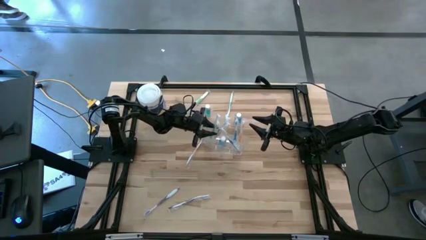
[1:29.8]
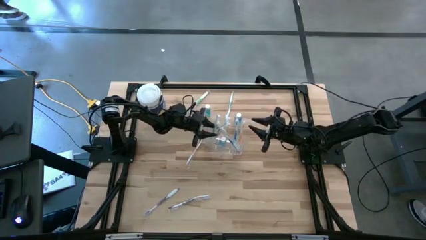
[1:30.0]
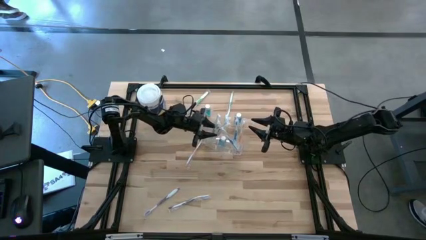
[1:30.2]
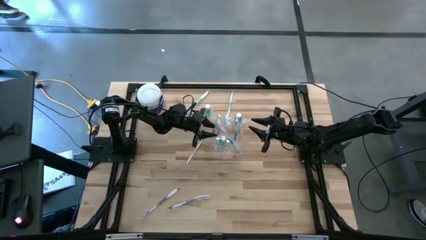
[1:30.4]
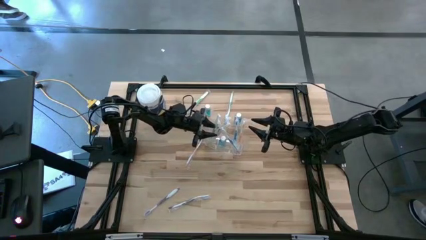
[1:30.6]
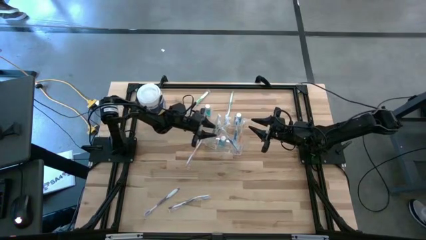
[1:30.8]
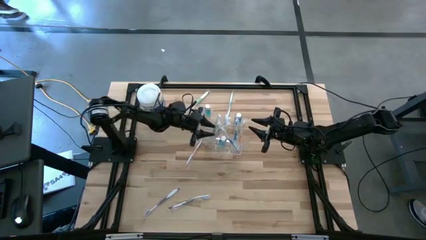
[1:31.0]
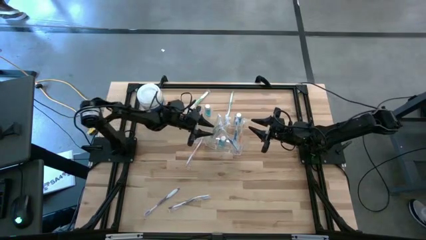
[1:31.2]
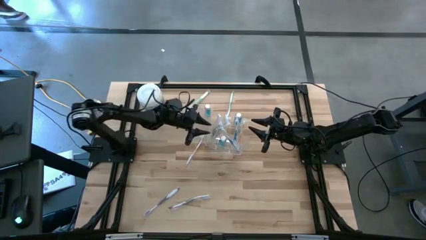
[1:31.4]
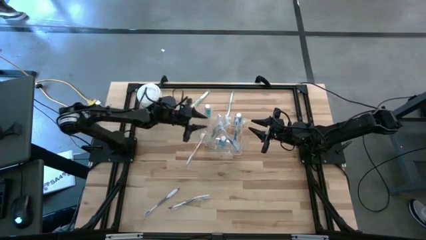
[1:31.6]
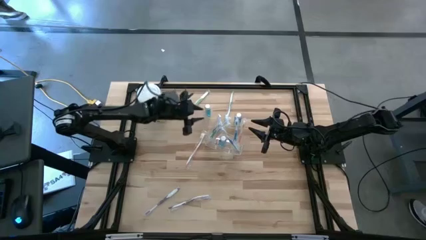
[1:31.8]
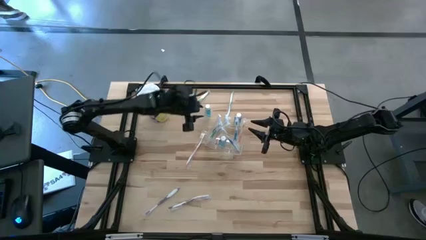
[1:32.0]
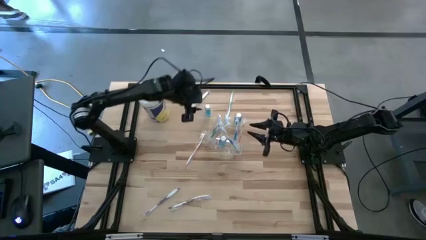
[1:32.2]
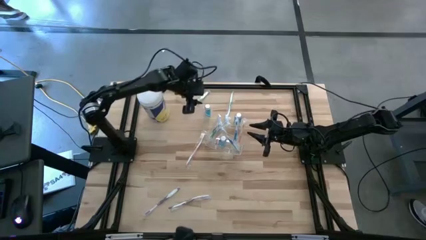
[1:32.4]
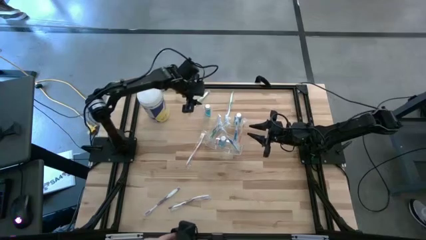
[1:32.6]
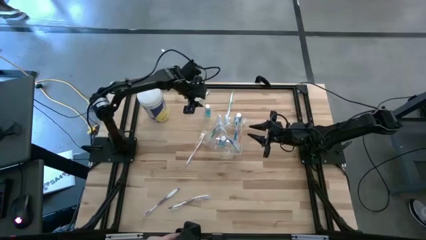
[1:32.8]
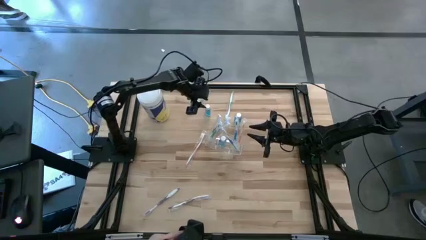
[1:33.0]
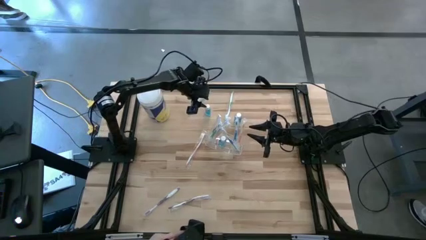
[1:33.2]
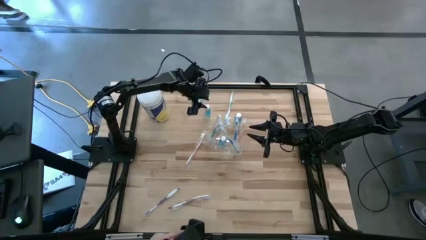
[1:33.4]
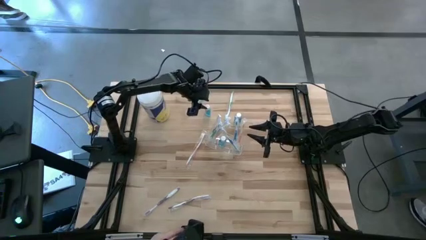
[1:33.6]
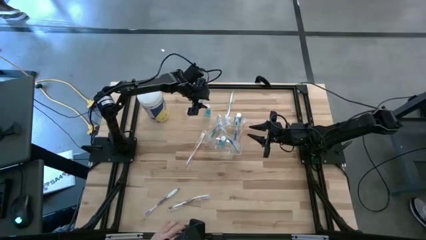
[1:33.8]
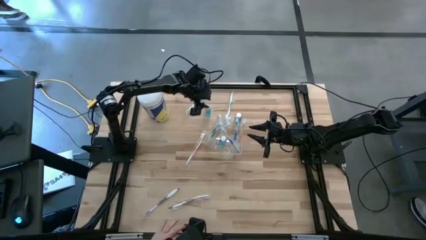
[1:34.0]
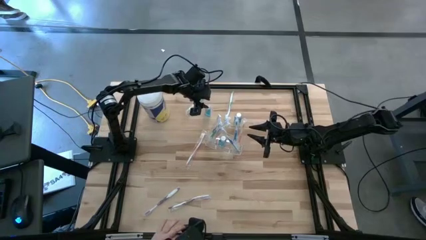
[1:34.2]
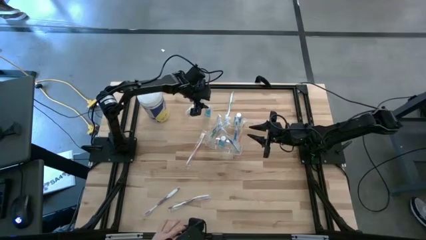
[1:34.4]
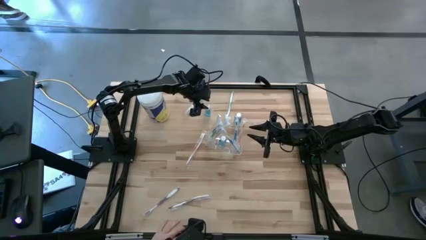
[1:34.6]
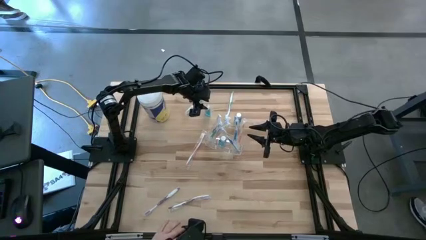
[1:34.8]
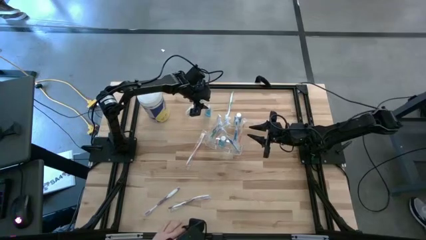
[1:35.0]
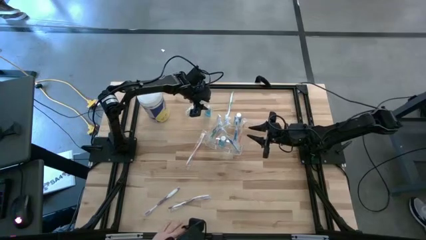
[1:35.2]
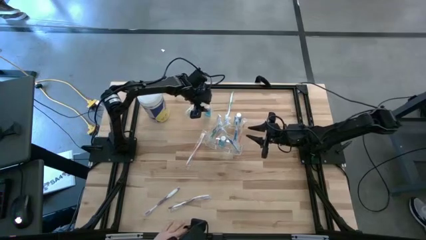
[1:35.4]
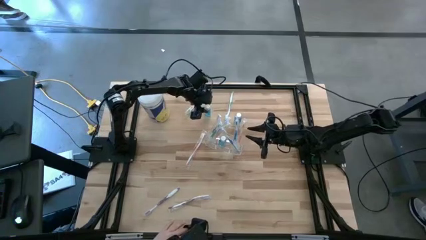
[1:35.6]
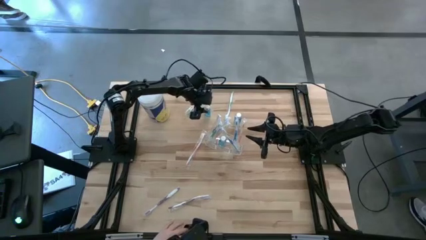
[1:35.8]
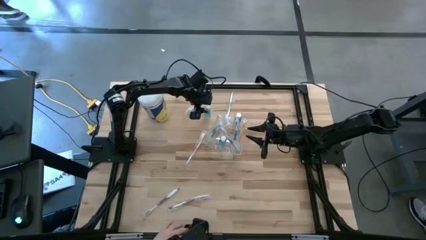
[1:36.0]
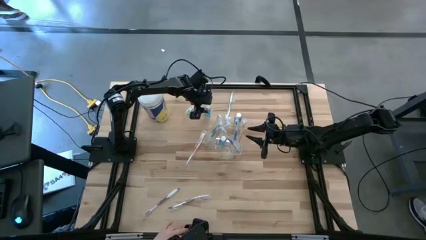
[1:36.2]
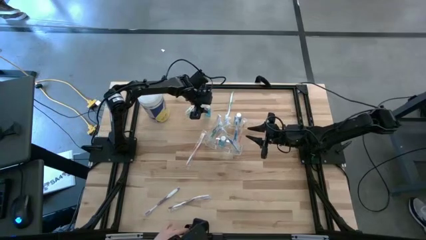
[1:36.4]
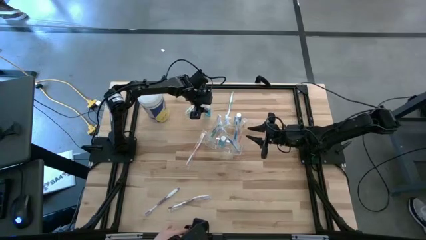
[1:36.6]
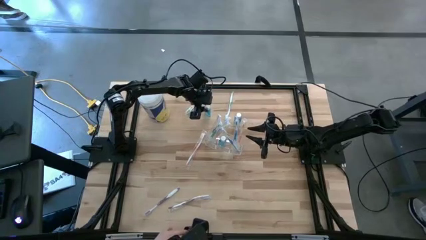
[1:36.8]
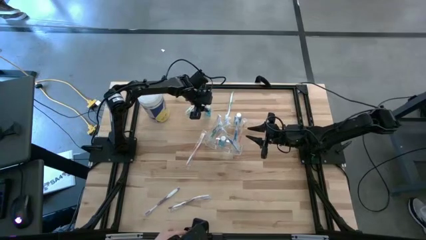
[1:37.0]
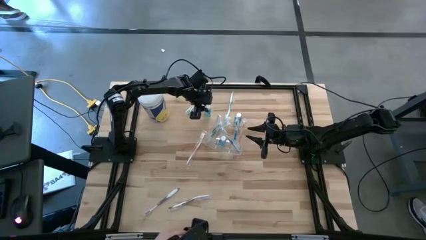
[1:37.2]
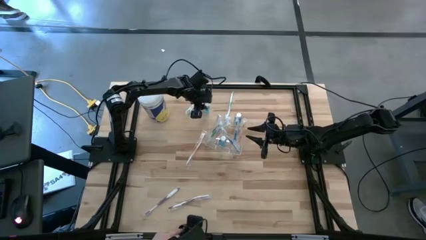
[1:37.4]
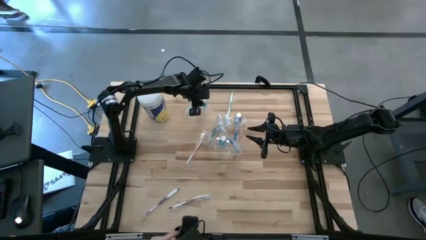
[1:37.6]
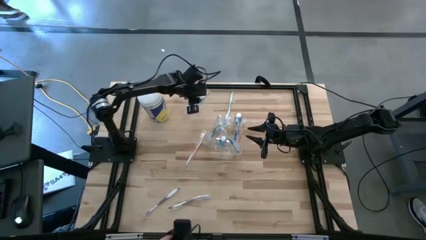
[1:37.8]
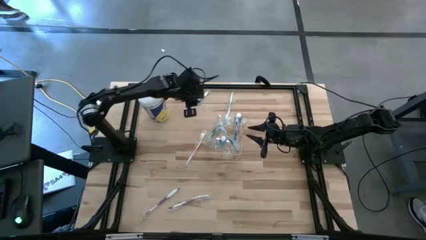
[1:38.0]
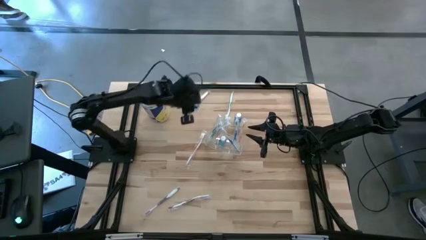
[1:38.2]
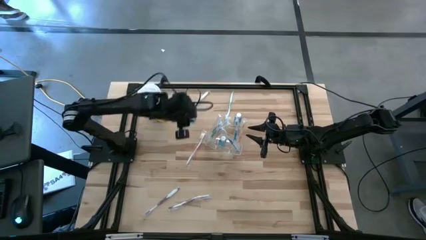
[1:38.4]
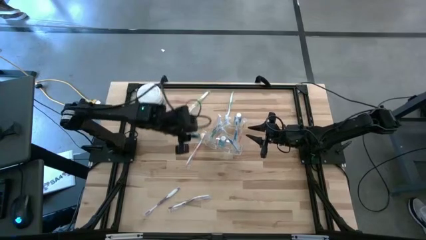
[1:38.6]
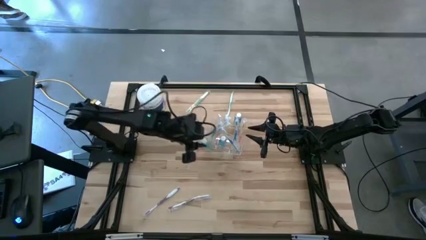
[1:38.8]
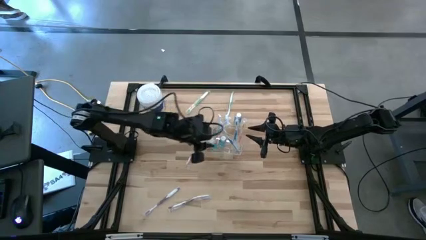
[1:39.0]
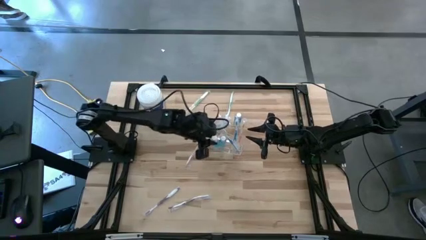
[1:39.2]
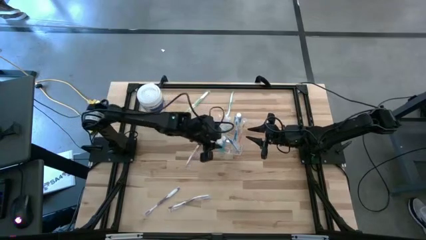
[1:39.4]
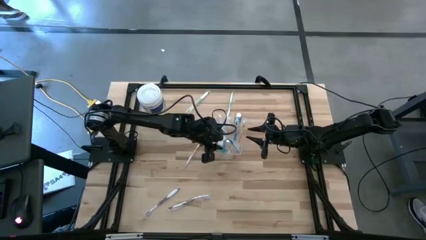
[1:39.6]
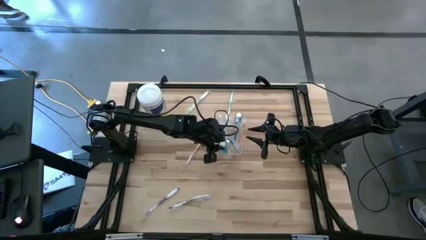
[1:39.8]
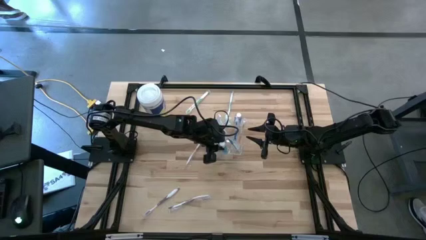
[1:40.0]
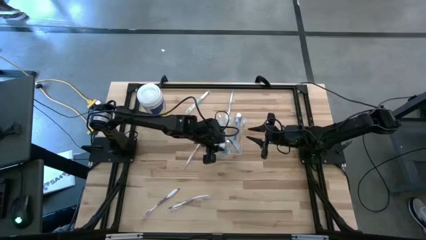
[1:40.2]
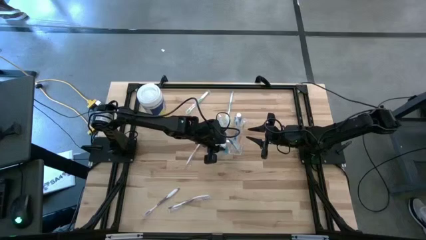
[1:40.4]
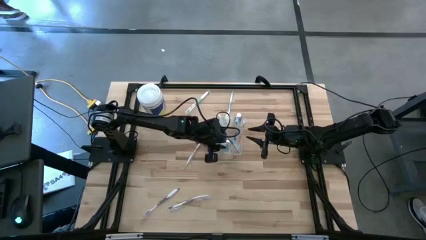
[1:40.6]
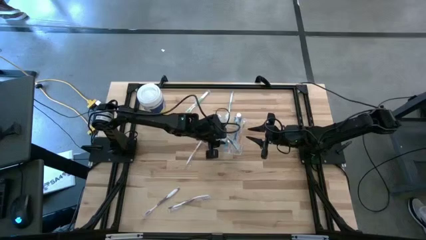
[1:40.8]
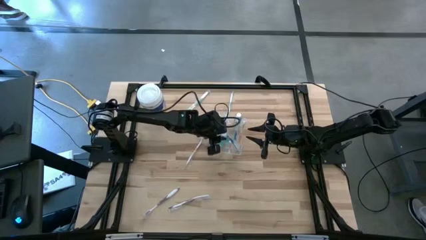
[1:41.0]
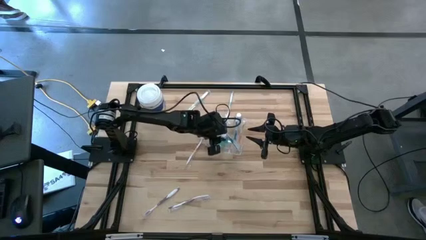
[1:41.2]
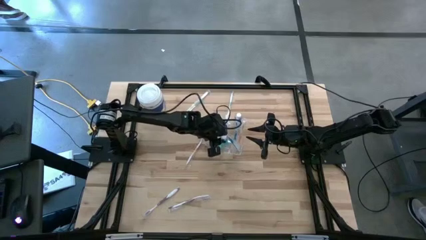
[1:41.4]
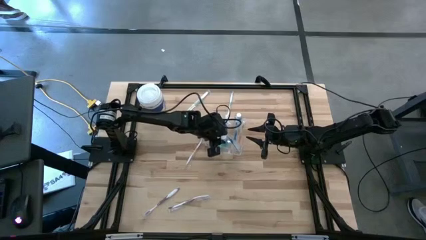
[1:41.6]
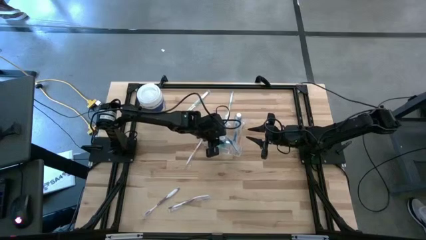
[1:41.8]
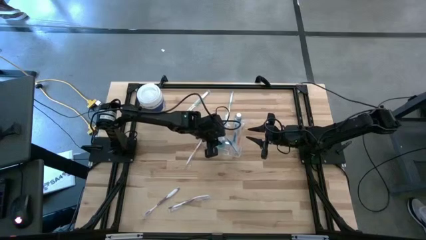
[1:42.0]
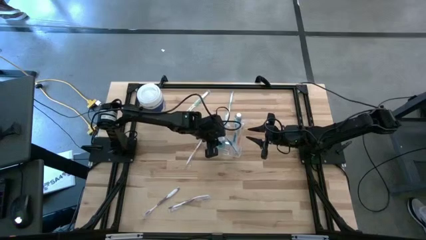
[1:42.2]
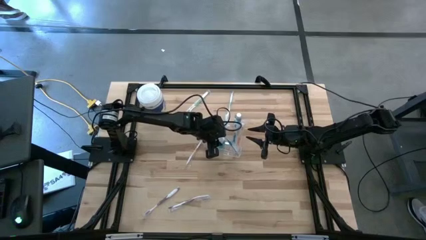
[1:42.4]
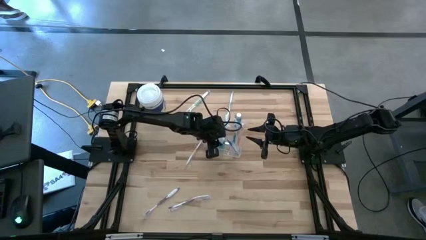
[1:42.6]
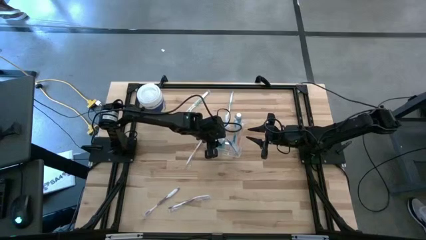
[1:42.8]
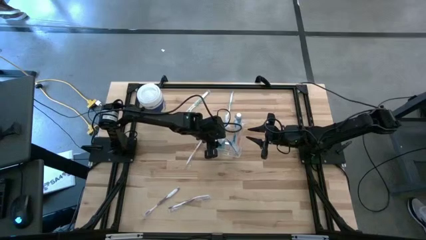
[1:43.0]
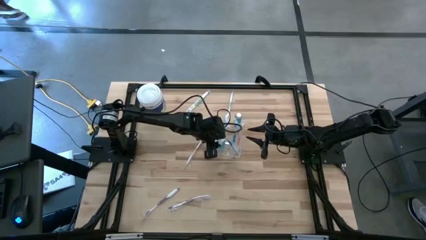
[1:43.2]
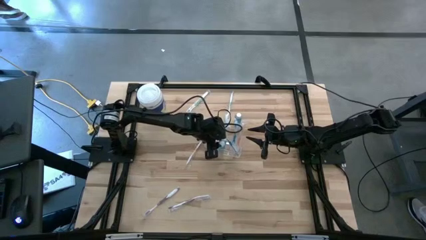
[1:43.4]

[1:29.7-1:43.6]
Task: Pick & Place toothbrushing station
Put the left mouthwash into the middle section of the transparent organizer
